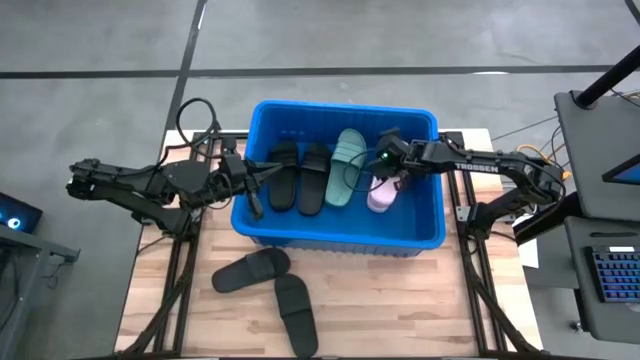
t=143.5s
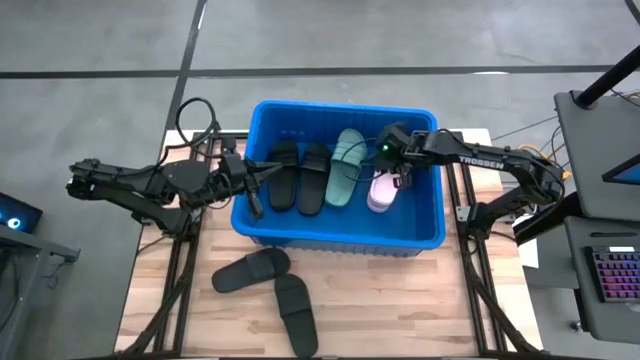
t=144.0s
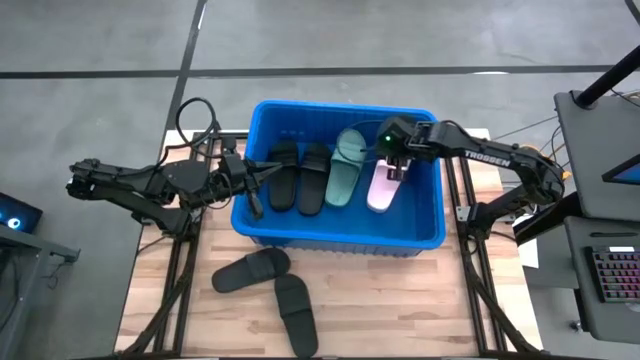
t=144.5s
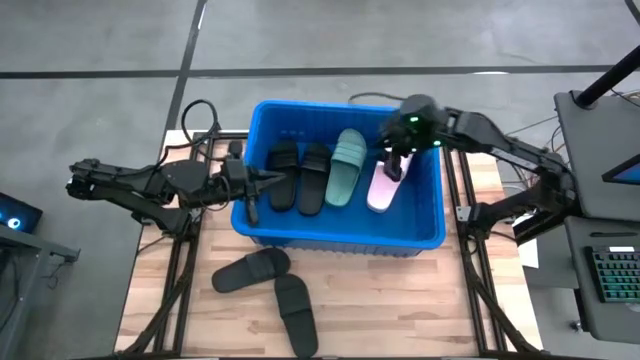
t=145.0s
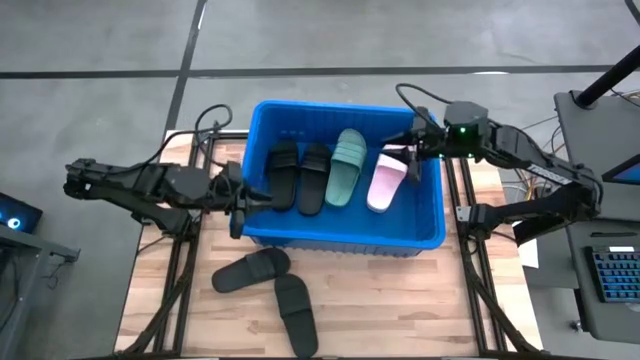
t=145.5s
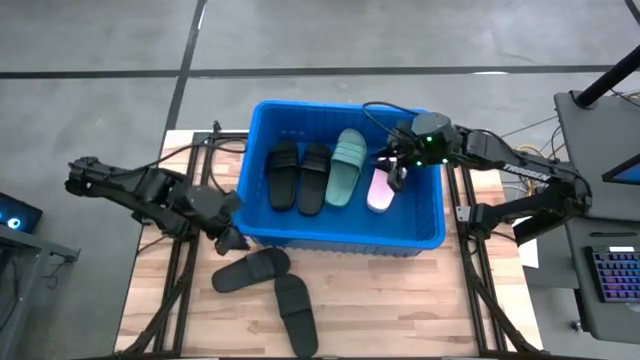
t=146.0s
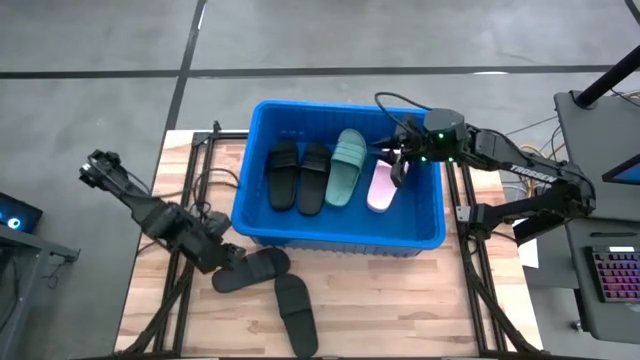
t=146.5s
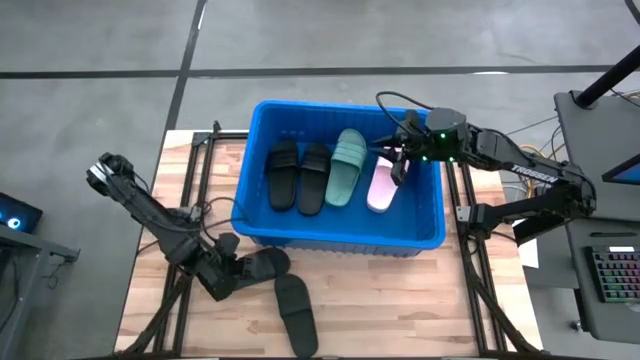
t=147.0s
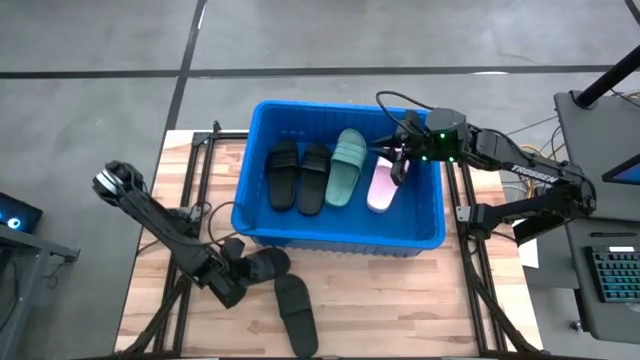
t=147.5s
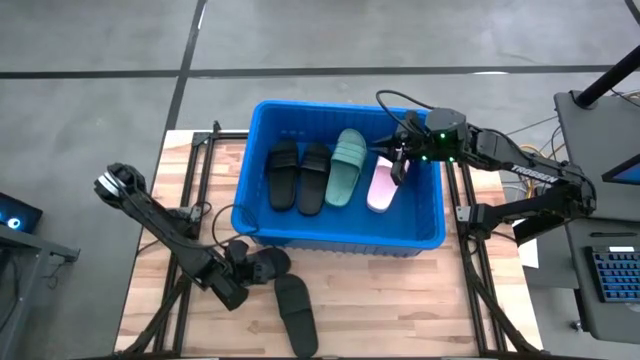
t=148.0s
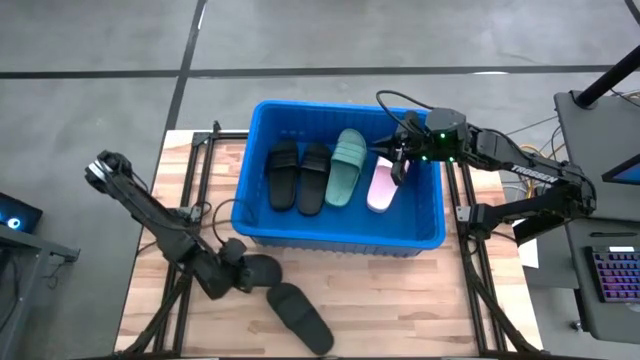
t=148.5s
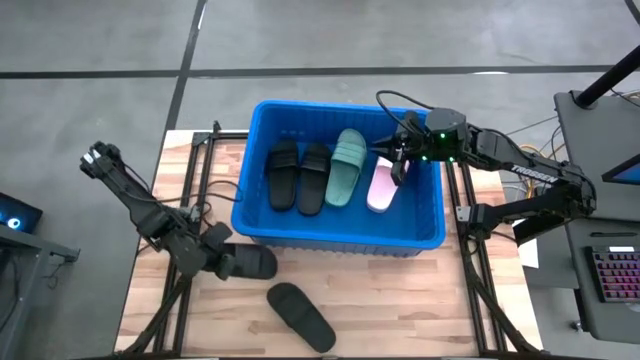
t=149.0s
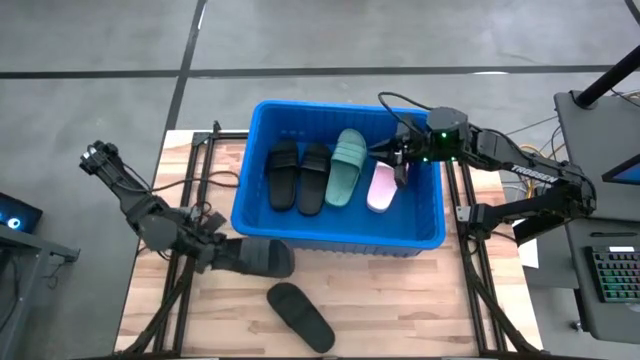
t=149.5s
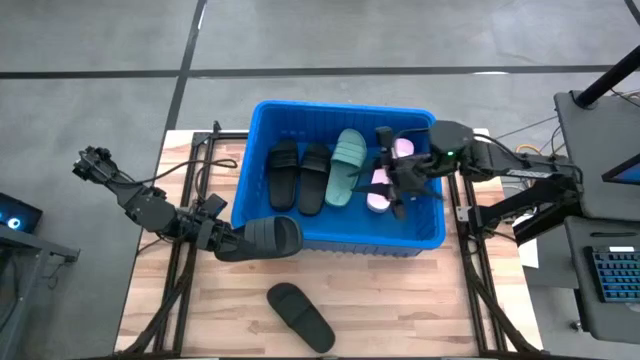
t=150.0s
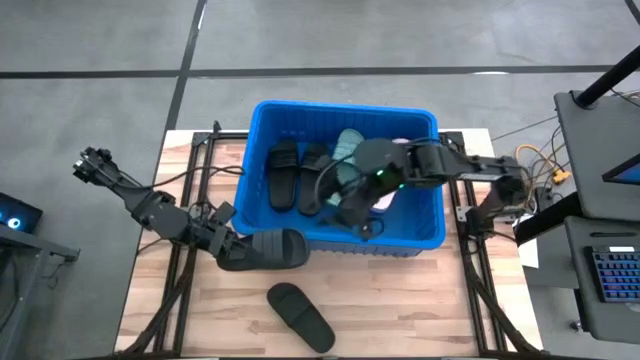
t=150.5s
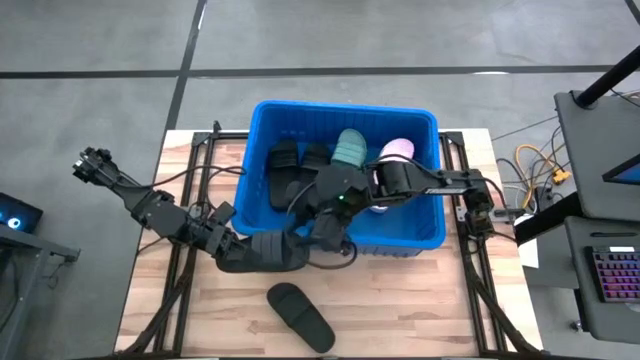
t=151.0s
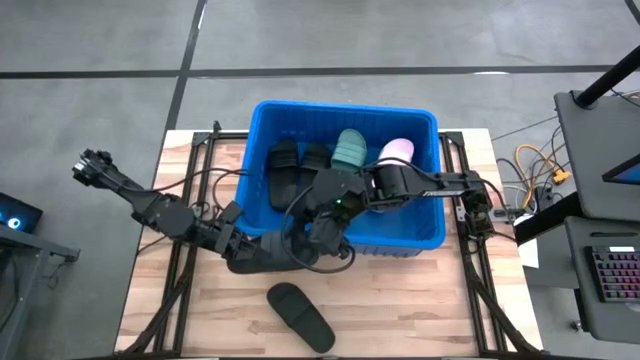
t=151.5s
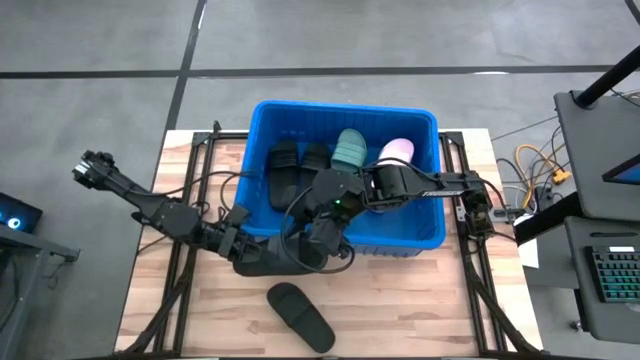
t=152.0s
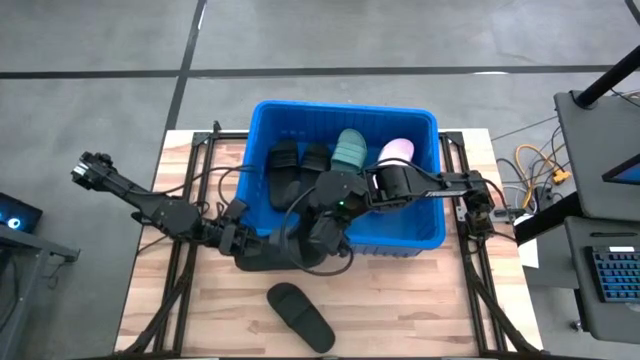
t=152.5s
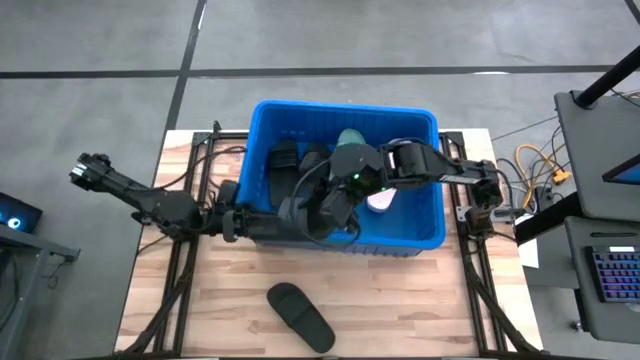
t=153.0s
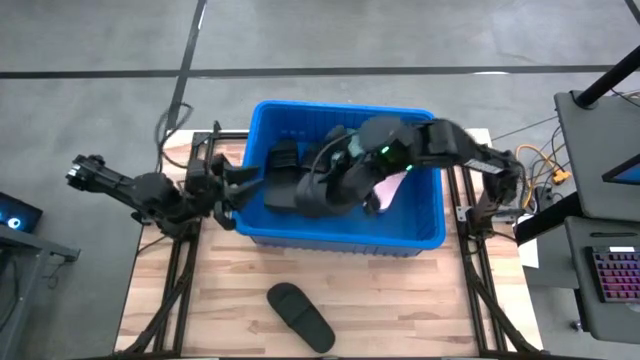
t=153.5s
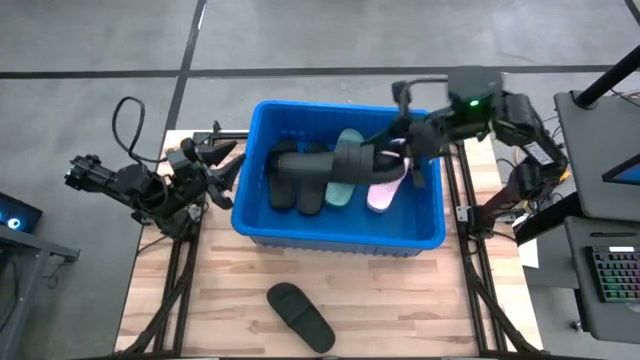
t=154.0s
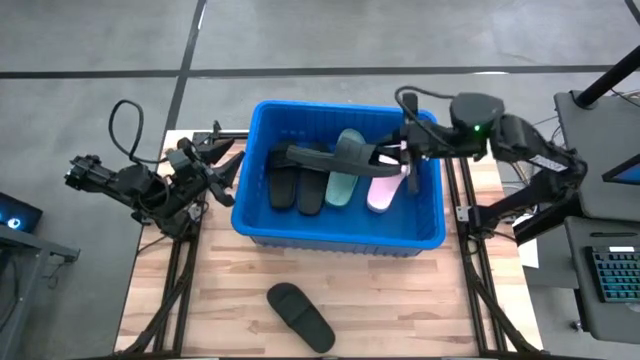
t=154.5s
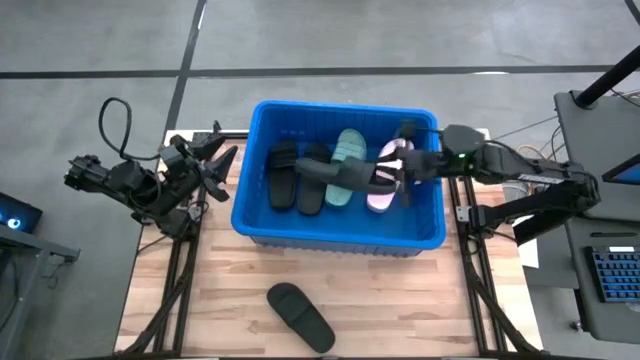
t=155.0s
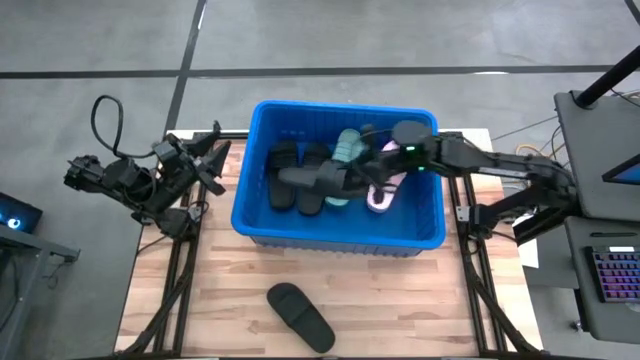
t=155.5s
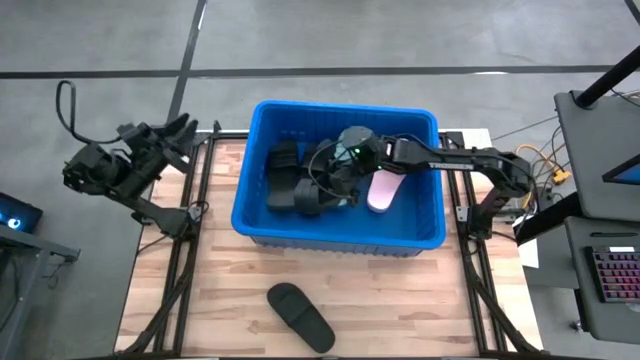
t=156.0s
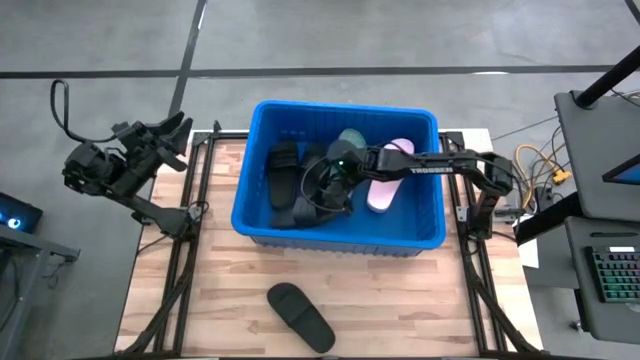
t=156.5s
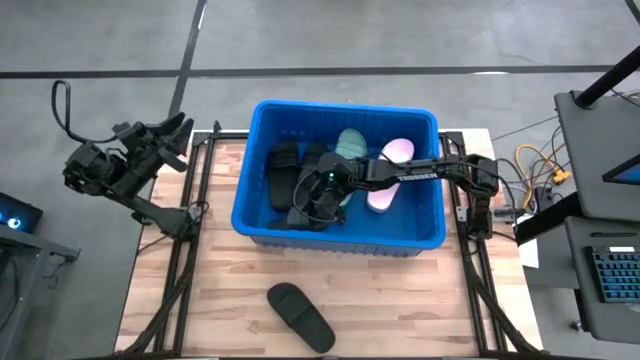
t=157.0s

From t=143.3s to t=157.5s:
Task: Pick and place slides into bin
Put the top black slide into the blue bin

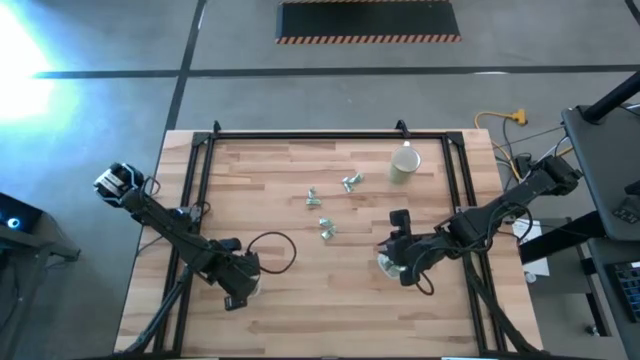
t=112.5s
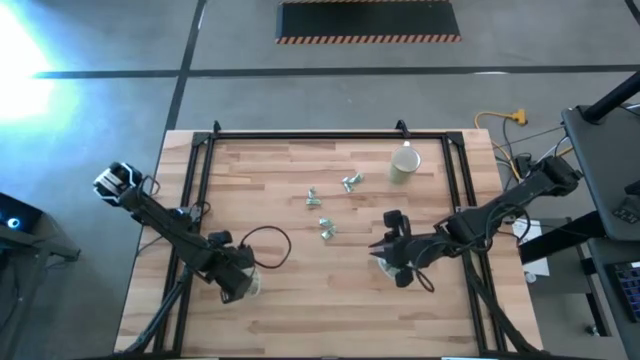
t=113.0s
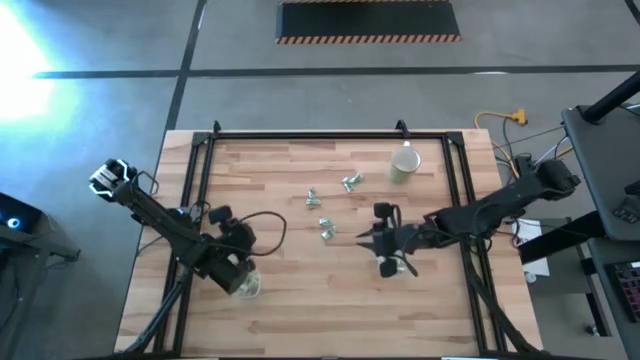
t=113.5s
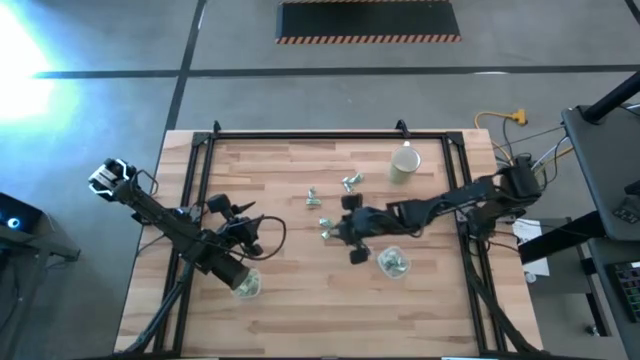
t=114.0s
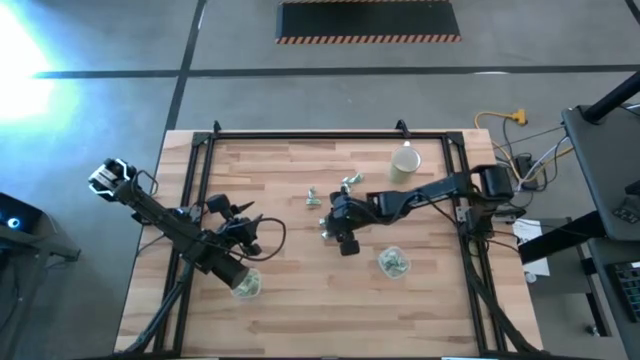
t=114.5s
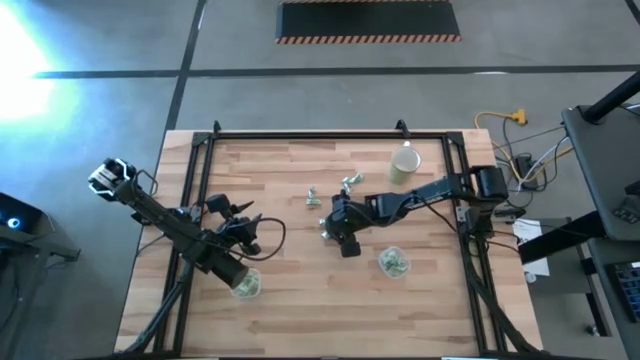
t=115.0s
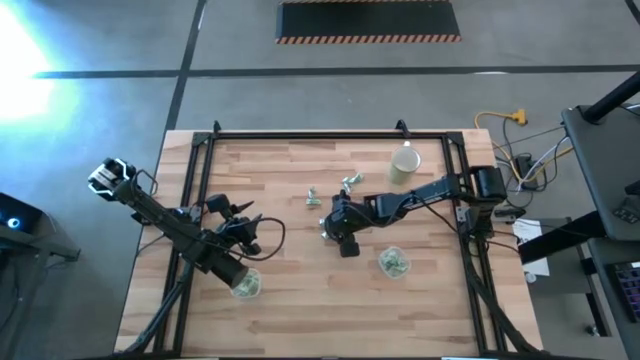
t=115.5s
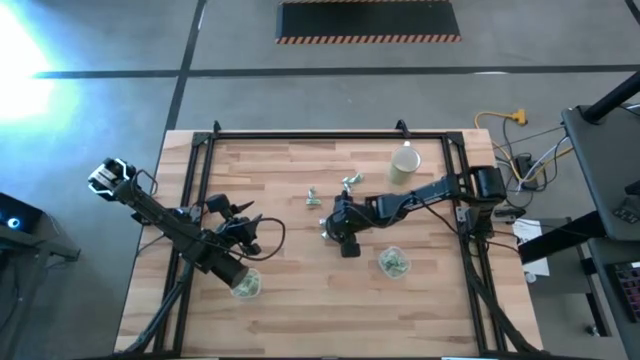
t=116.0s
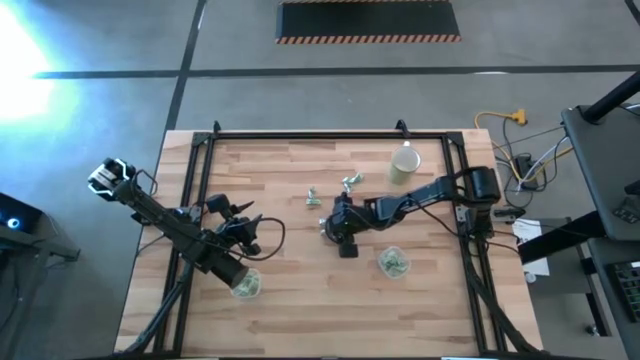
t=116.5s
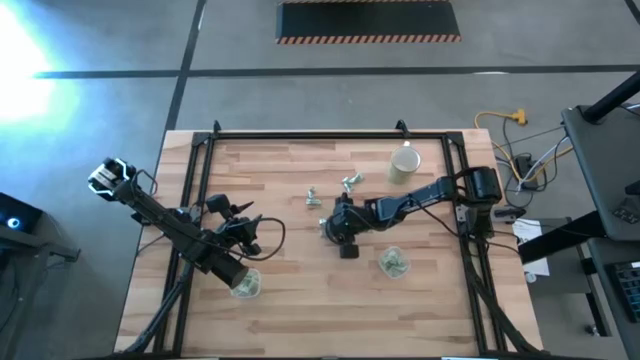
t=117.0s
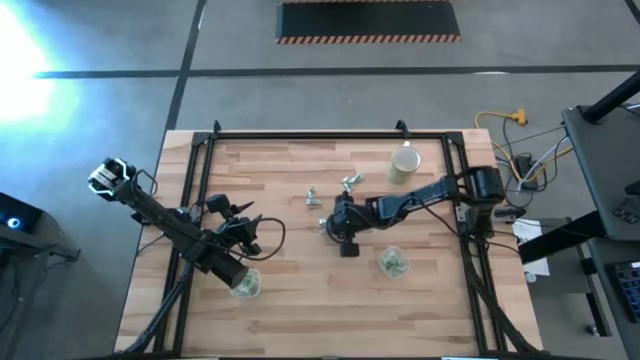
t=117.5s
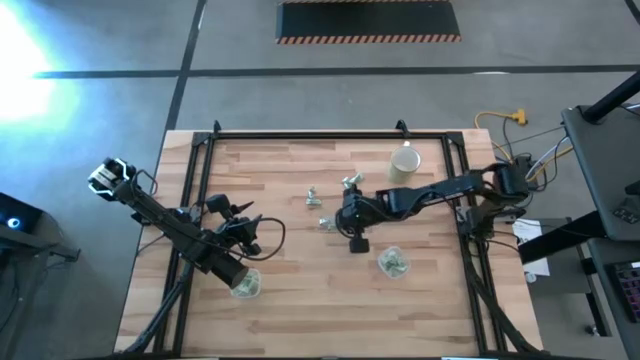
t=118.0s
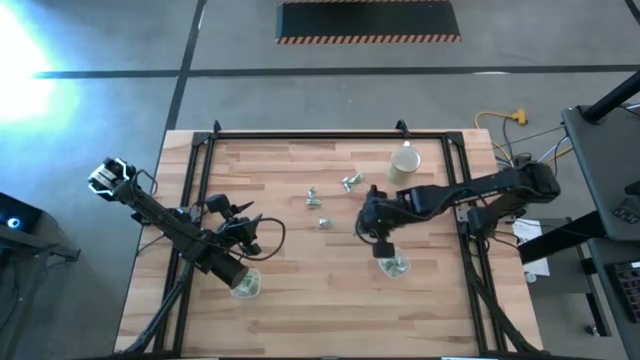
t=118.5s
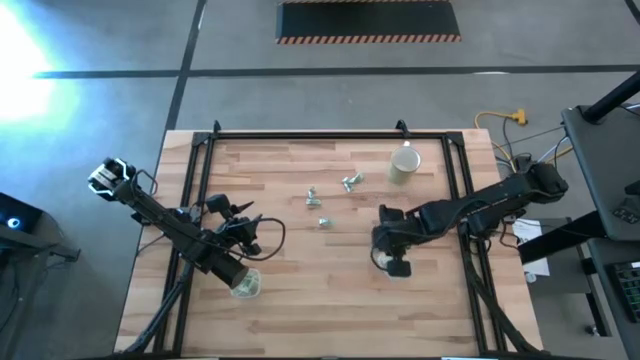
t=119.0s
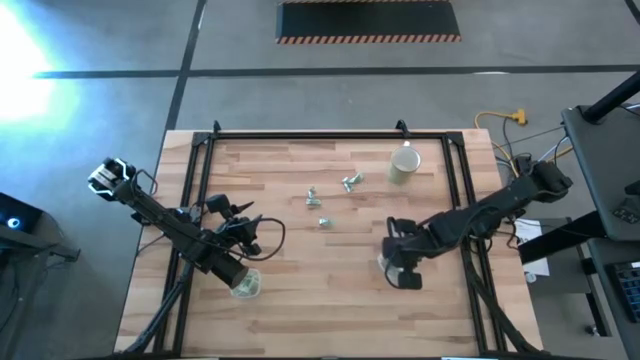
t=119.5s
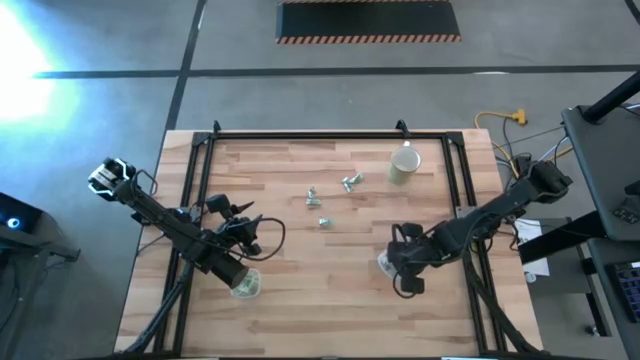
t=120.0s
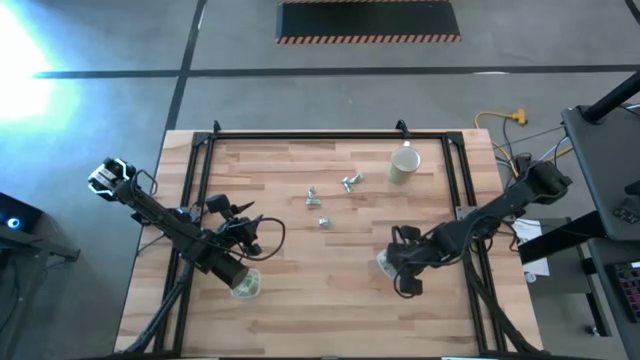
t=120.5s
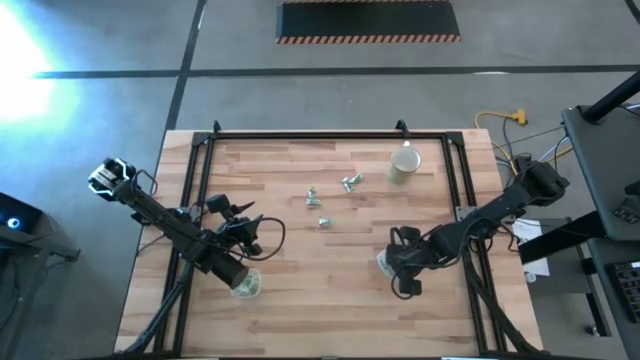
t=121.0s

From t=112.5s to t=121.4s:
Task: Pick and place Stevia / Truvia into bins
Put the stevia packet into the right transparent container
